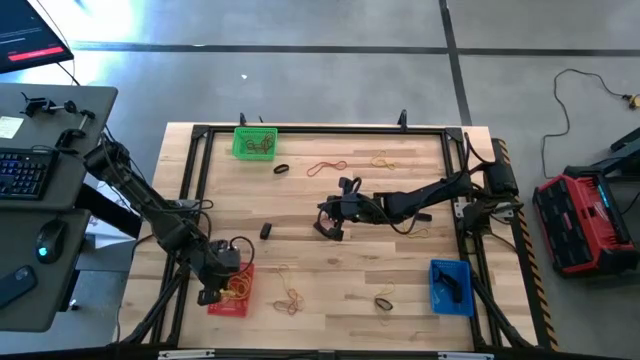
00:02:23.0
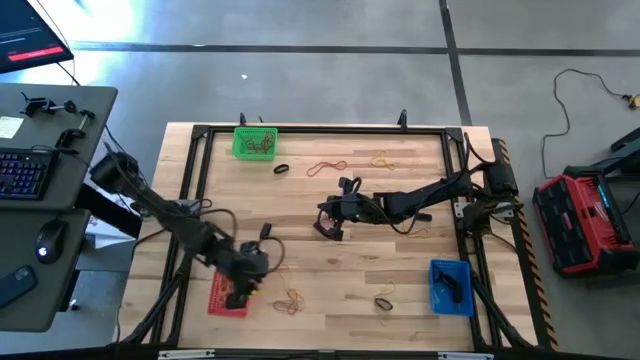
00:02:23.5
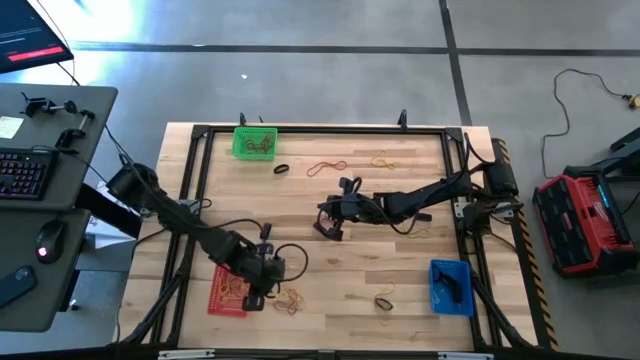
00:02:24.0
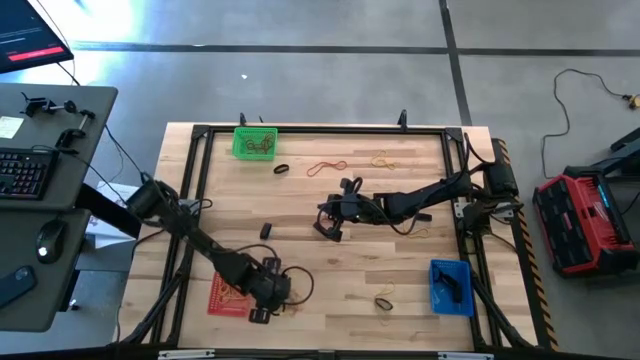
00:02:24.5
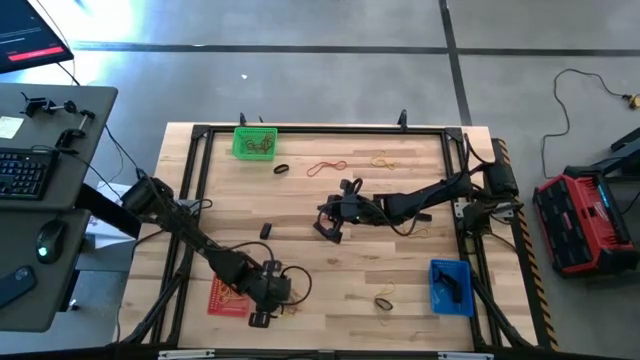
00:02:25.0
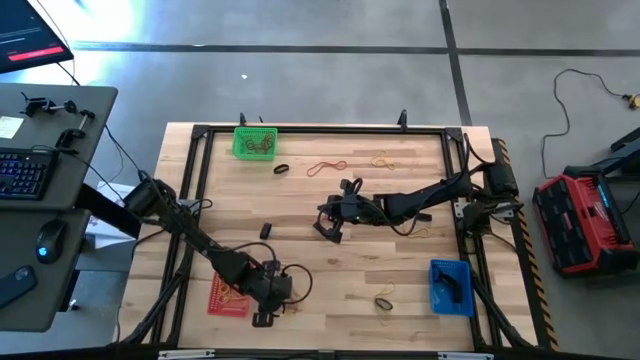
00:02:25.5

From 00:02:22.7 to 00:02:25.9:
Task: Sort rubber bands into baskets
Put the red rubber band into the green bin

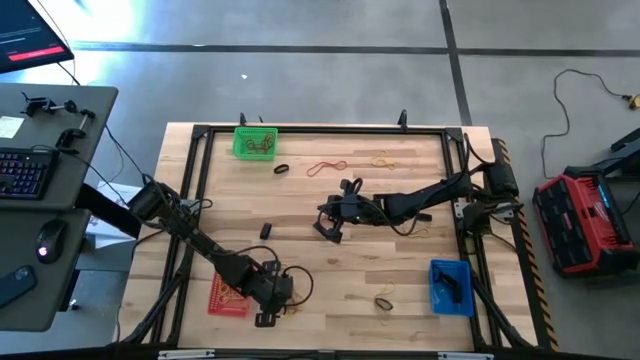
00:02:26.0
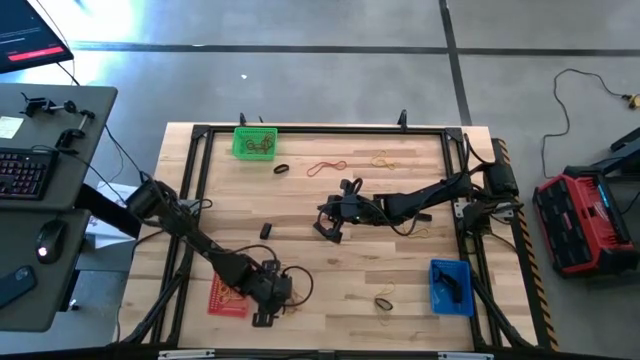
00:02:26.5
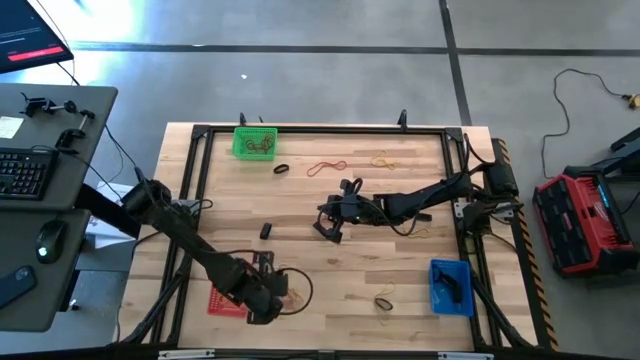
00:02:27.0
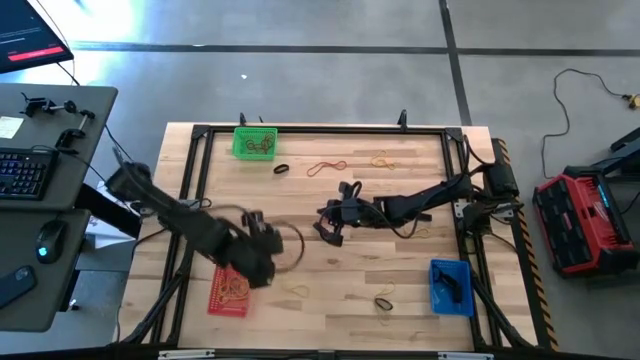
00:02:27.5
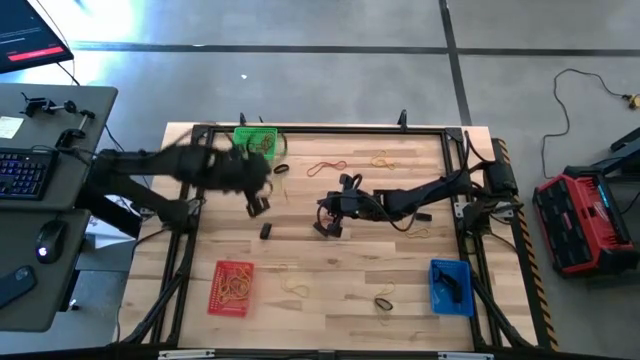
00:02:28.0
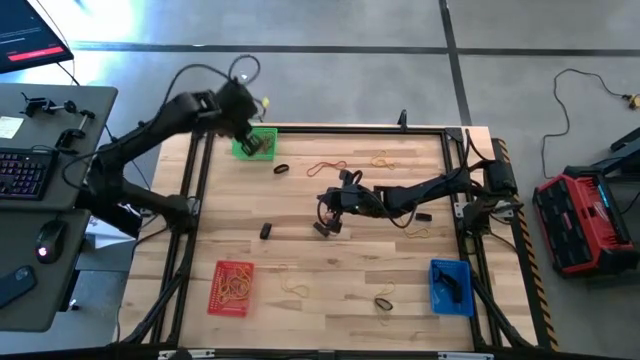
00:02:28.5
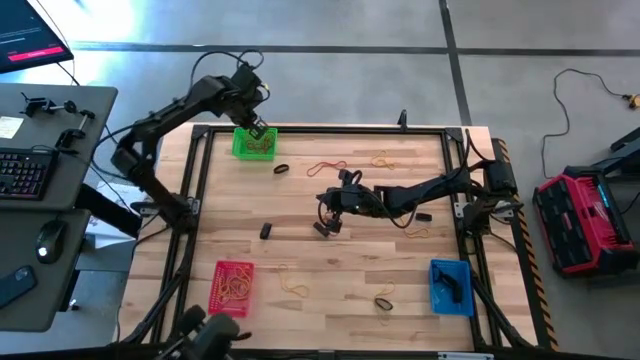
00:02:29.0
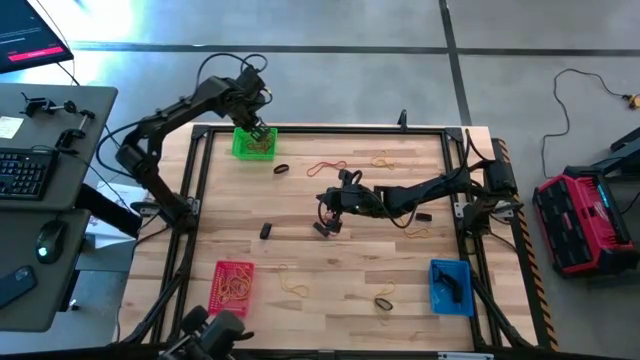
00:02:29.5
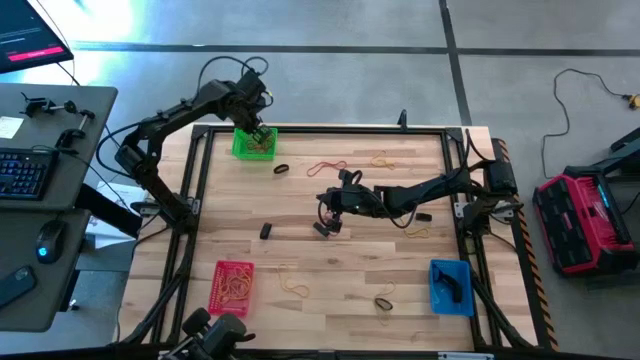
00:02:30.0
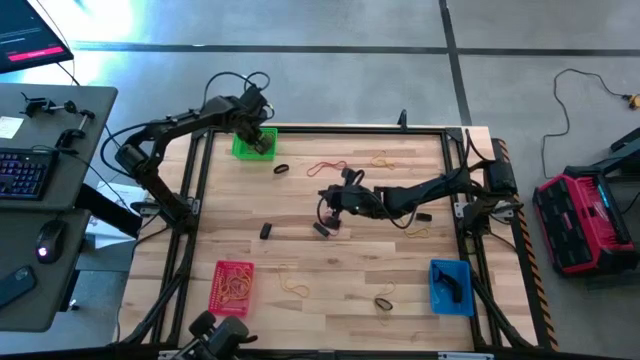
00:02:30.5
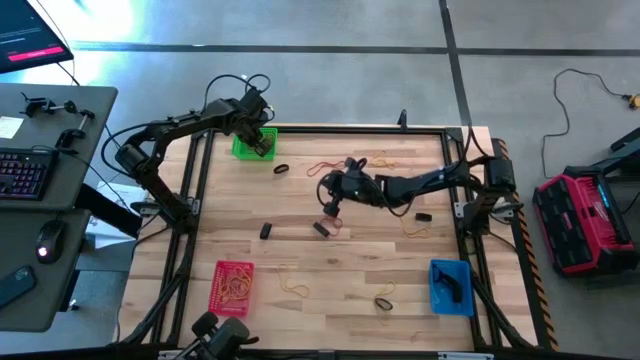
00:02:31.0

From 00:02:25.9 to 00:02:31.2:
Put the red rubber band into the green bin

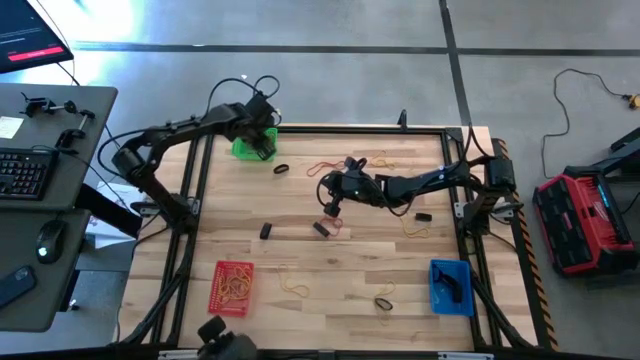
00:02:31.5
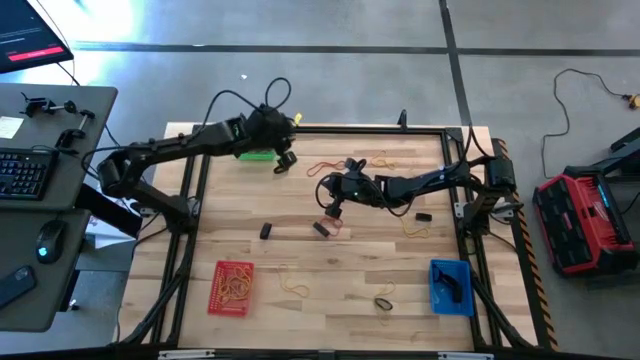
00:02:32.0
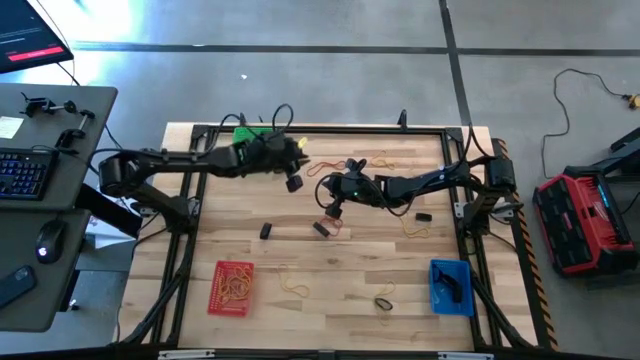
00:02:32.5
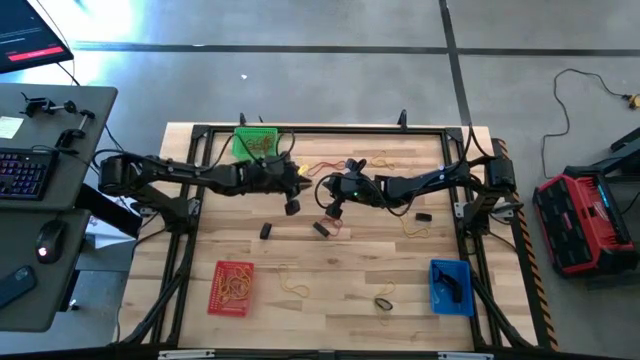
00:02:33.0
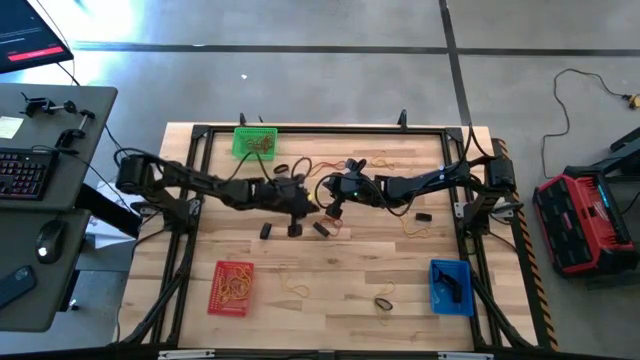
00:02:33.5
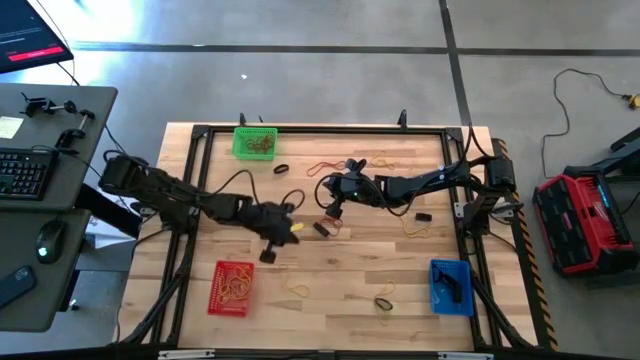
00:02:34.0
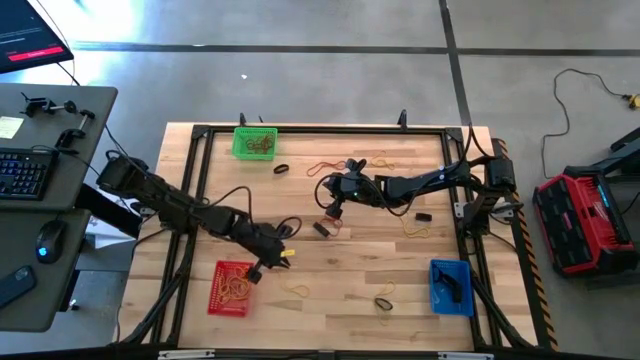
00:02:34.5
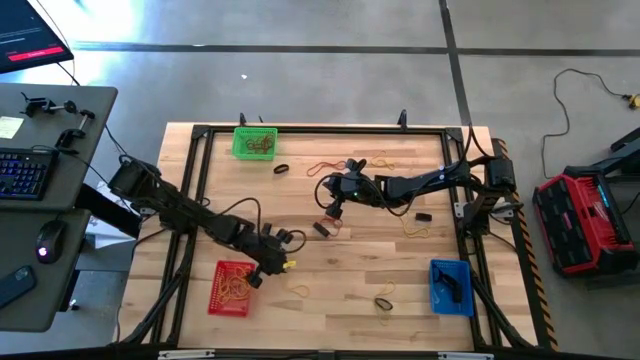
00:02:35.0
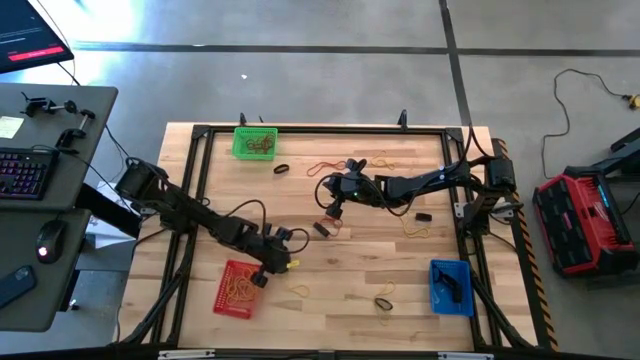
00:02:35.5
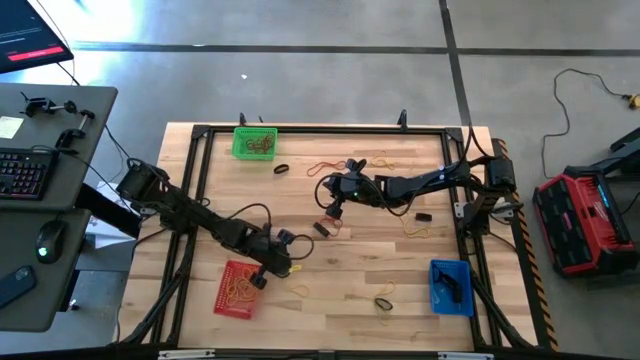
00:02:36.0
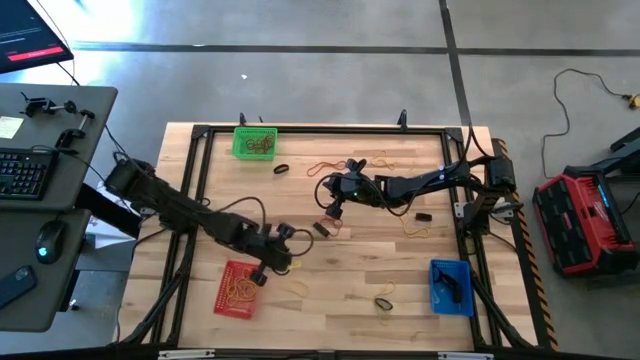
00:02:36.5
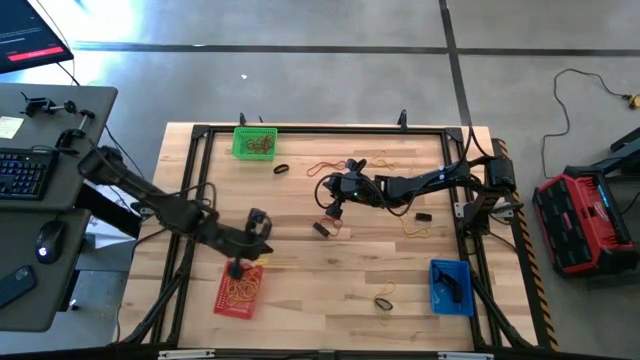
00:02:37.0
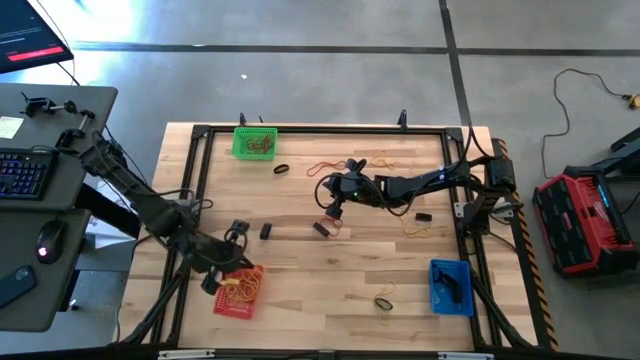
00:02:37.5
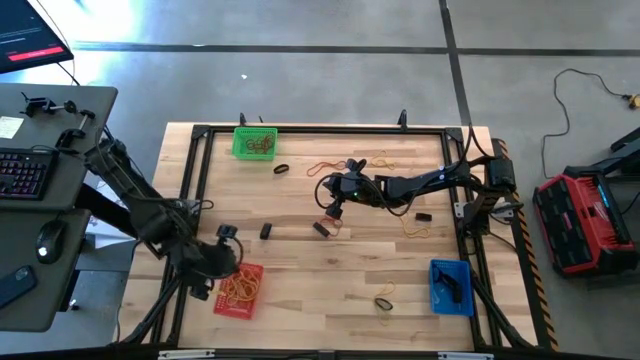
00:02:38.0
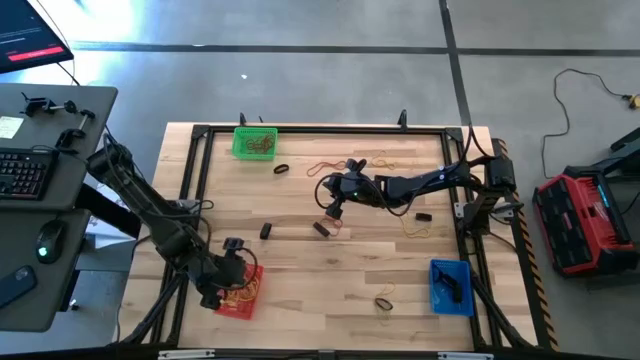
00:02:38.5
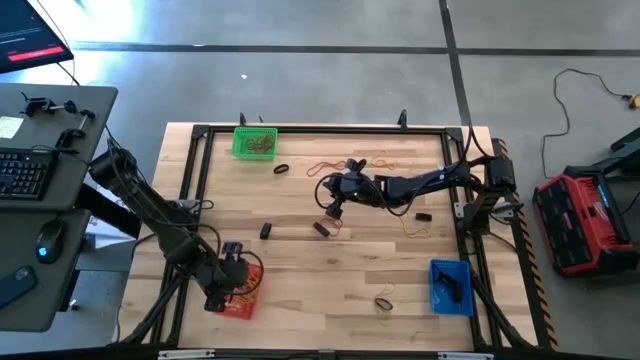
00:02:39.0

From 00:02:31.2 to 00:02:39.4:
Put the yellow rubber band into the red bin

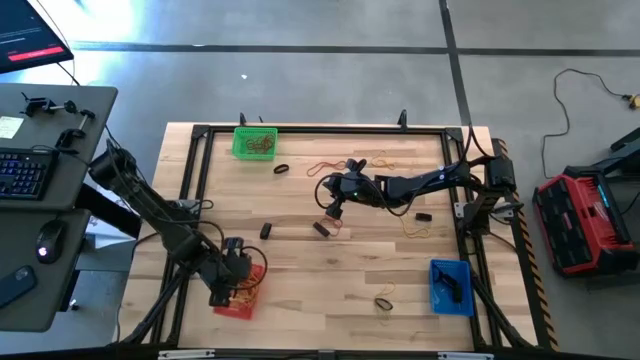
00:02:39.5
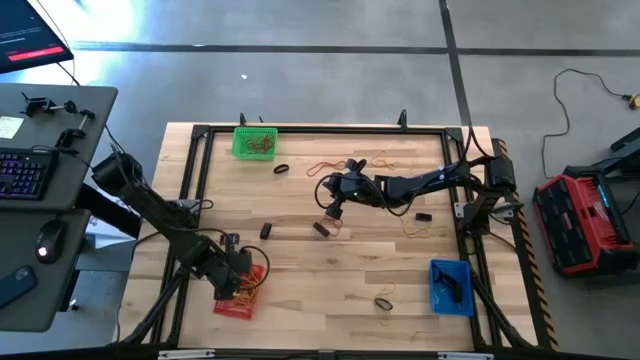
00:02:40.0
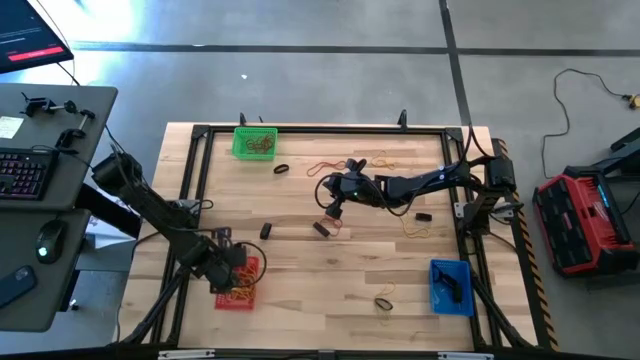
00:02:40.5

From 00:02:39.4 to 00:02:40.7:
Adjust the red bin

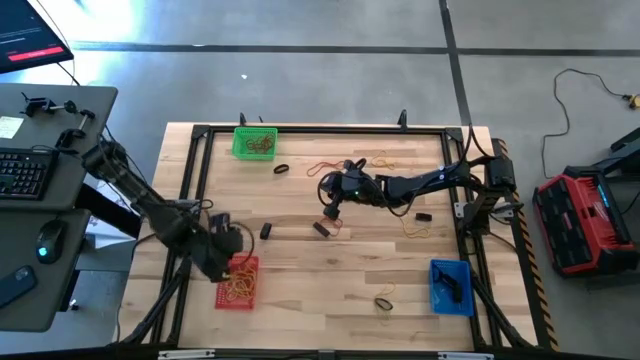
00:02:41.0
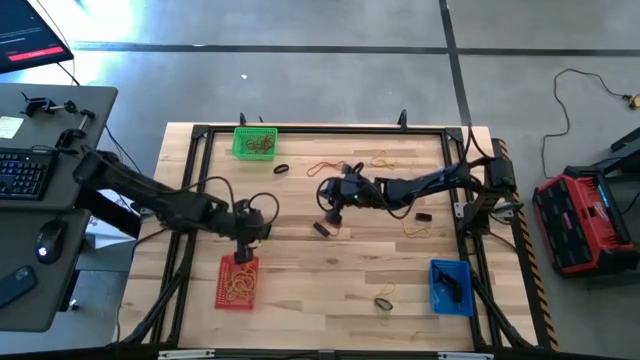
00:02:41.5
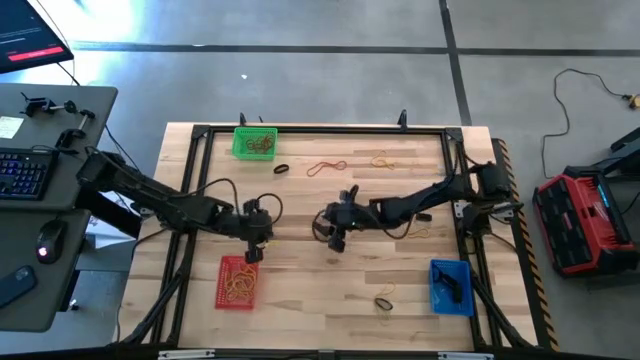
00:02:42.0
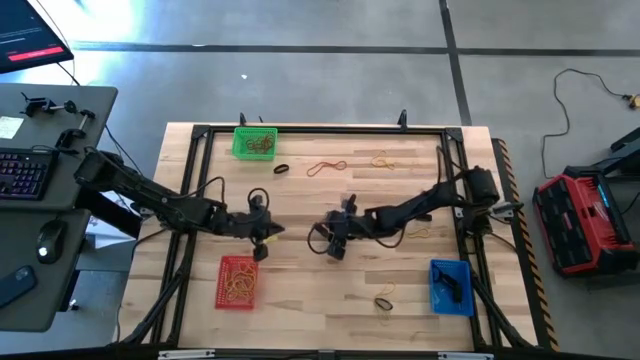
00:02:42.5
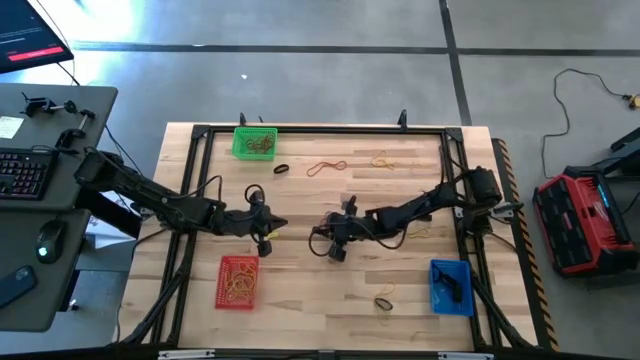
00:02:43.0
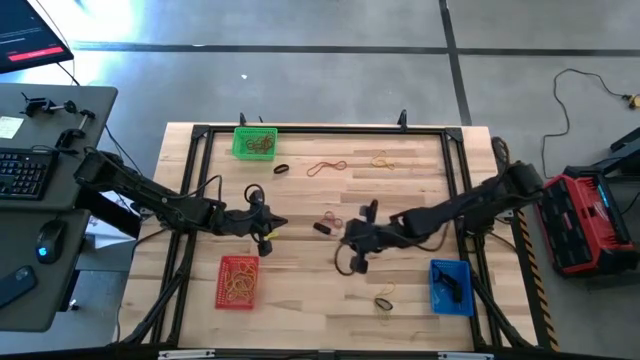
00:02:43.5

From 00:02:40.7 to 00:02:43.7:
Put the black rubber band into the blue bin

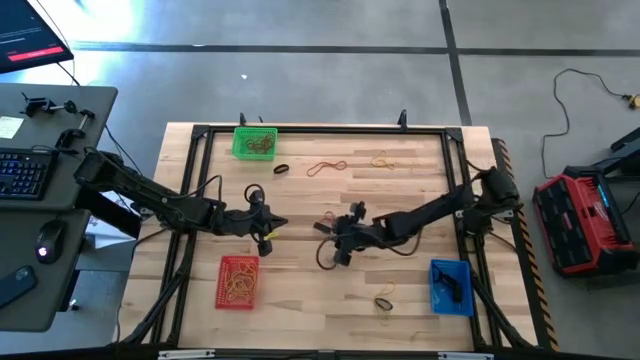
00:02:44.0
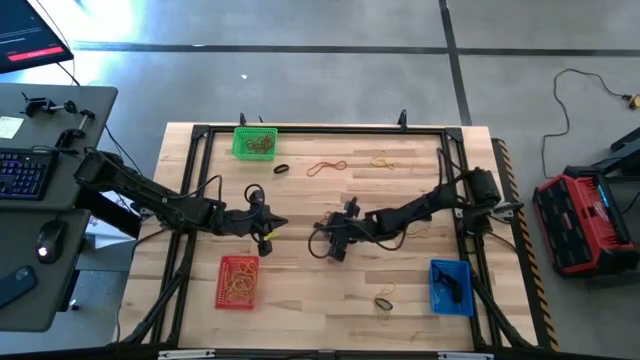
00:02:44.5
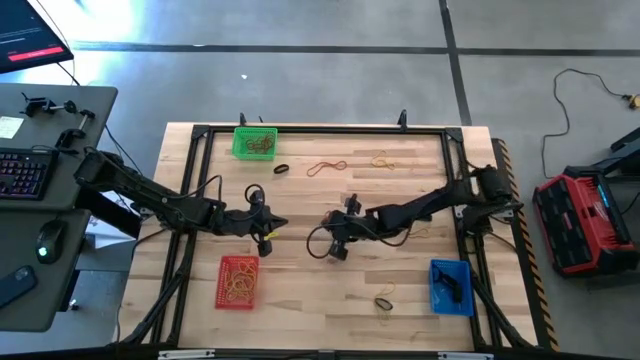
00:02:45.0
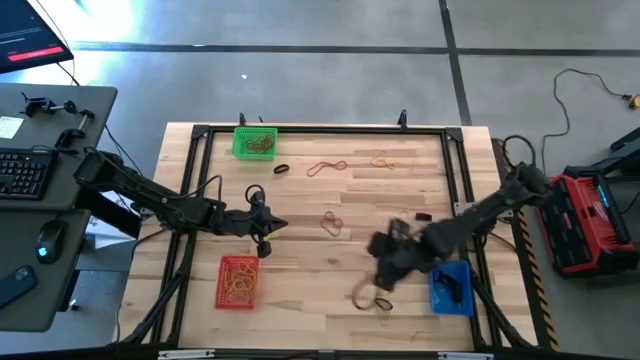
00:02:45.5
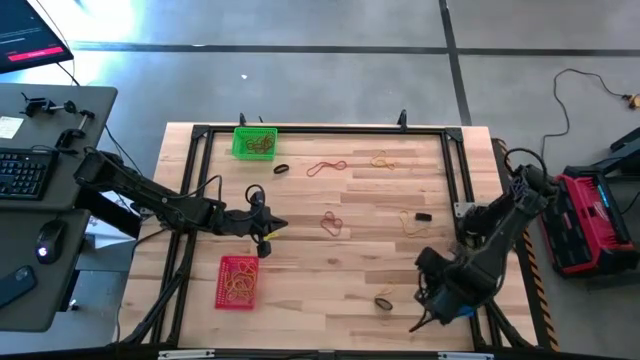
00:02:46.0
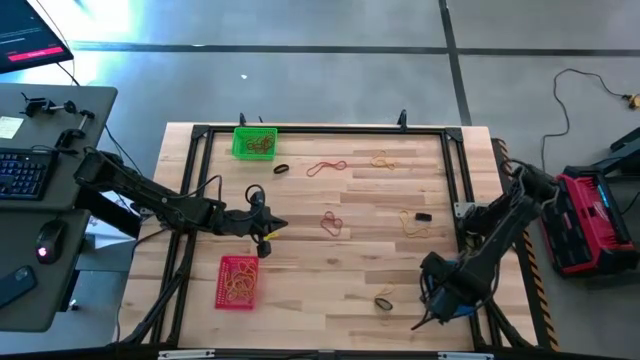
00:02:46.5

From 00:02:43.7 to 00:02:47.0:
Put the black rubber band into the blue bin
